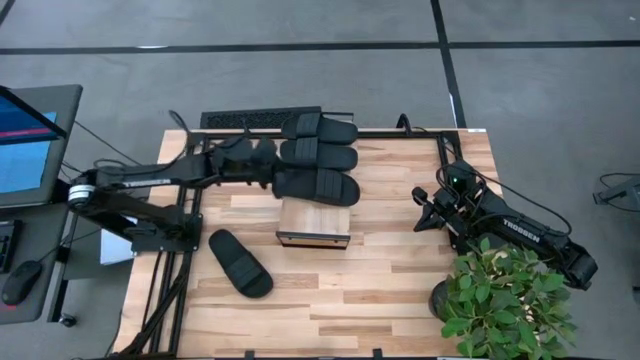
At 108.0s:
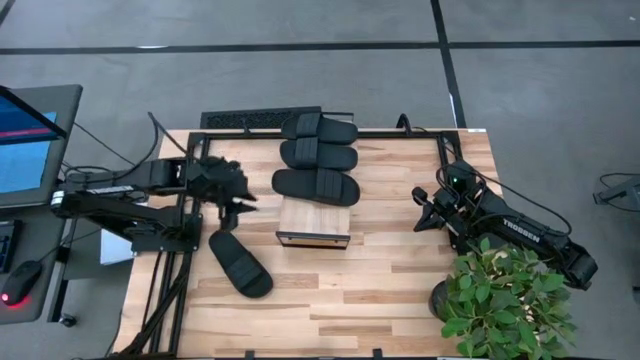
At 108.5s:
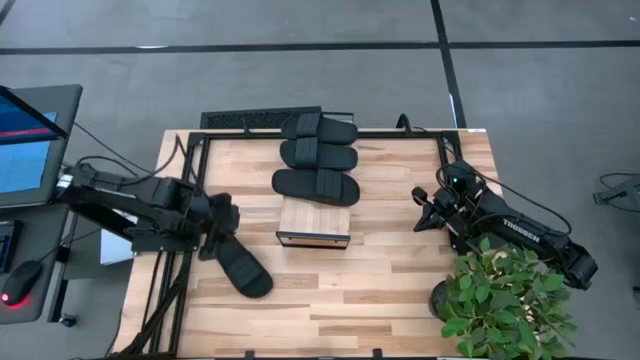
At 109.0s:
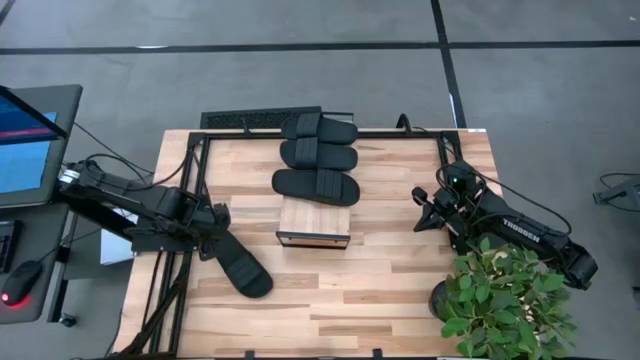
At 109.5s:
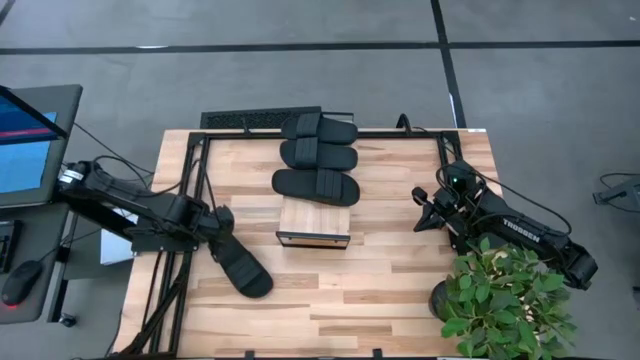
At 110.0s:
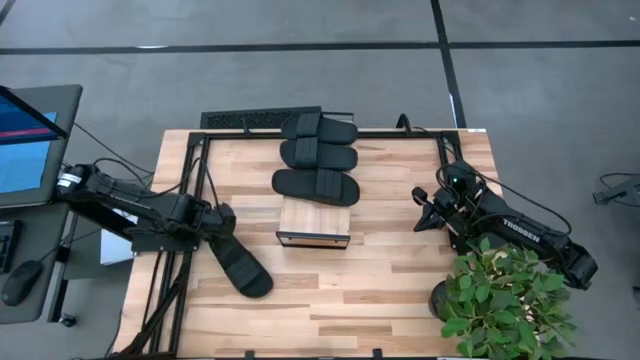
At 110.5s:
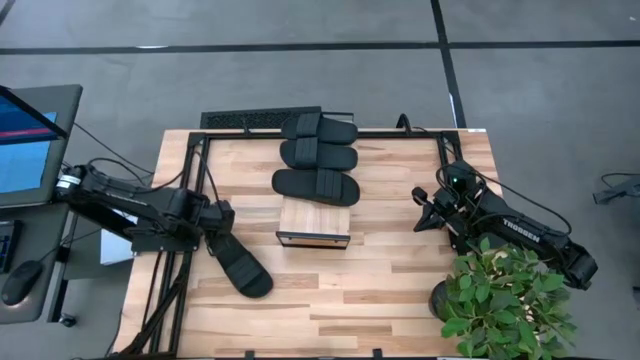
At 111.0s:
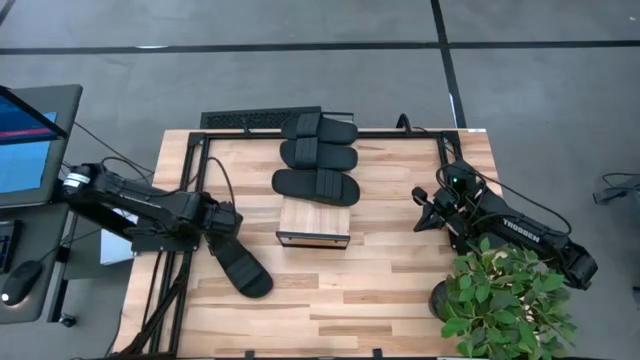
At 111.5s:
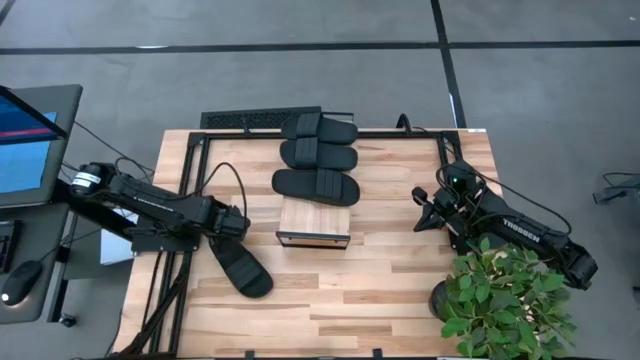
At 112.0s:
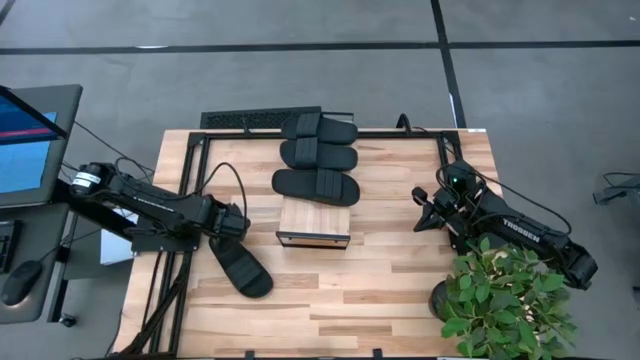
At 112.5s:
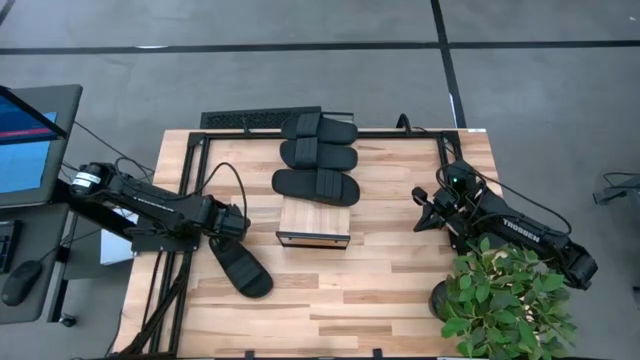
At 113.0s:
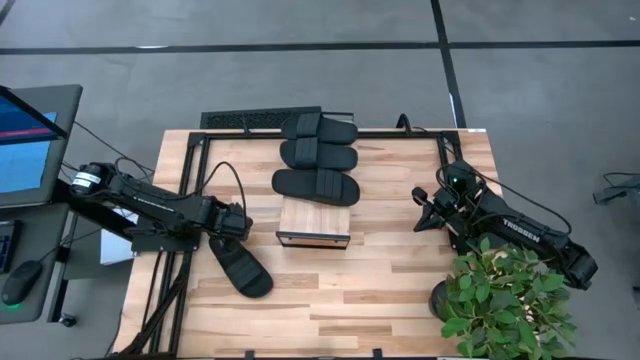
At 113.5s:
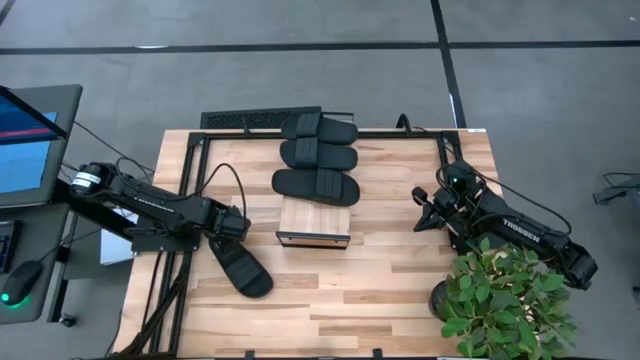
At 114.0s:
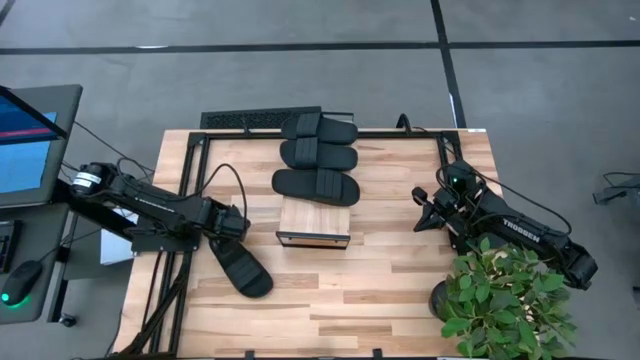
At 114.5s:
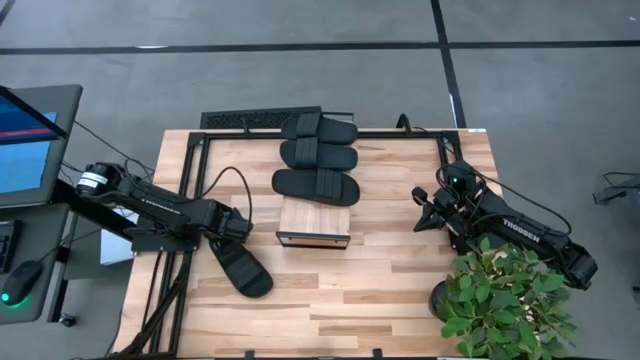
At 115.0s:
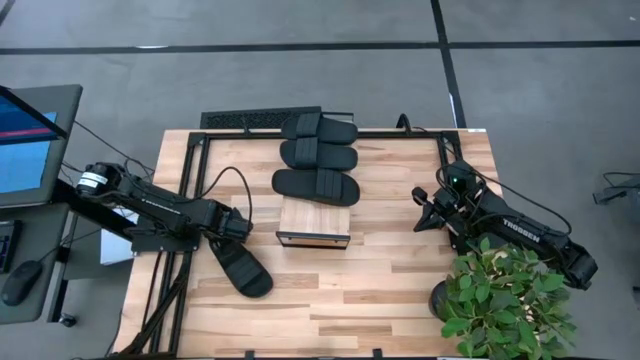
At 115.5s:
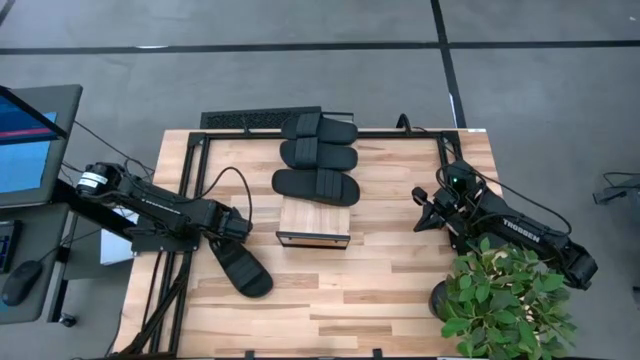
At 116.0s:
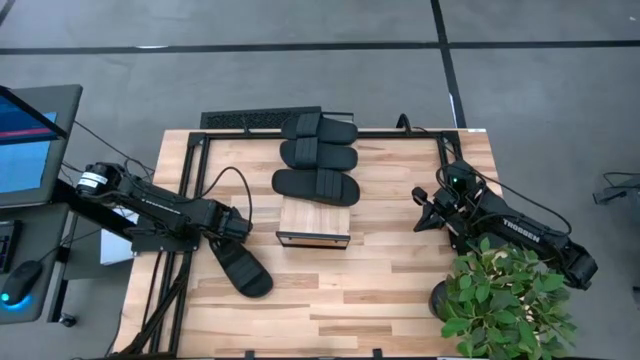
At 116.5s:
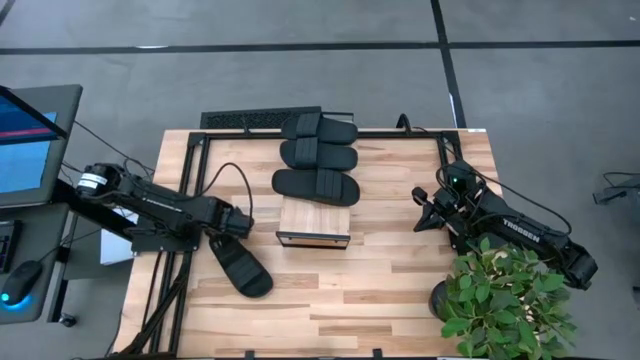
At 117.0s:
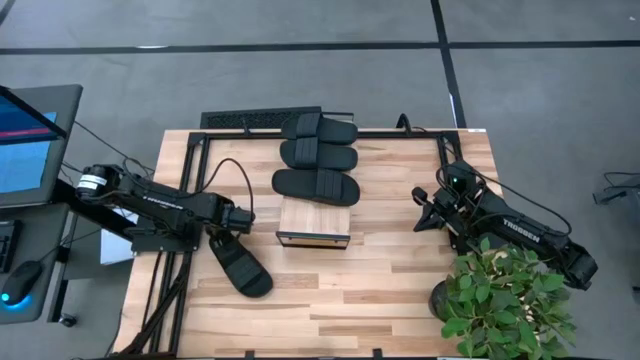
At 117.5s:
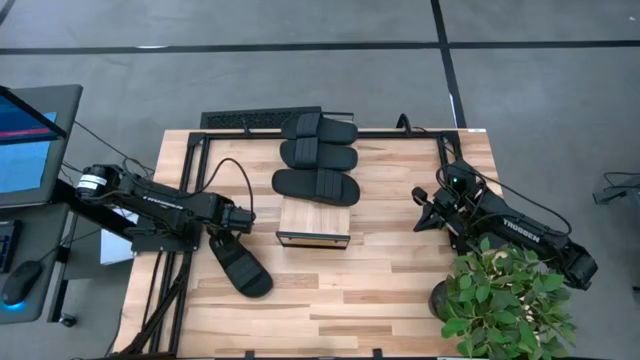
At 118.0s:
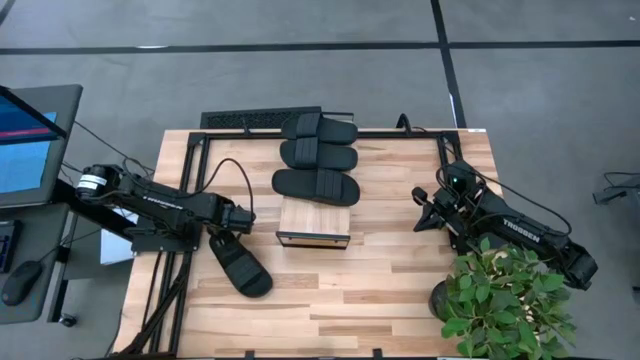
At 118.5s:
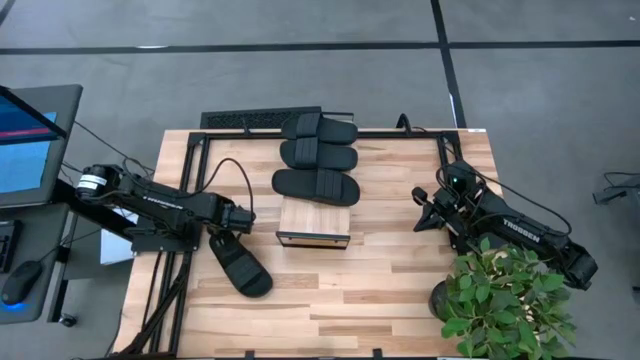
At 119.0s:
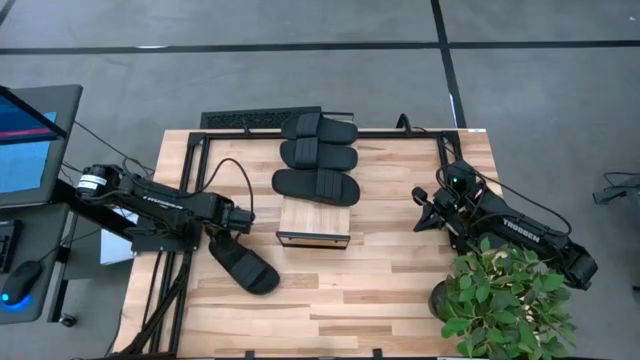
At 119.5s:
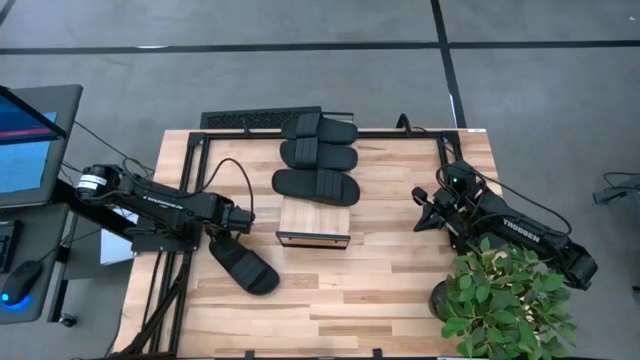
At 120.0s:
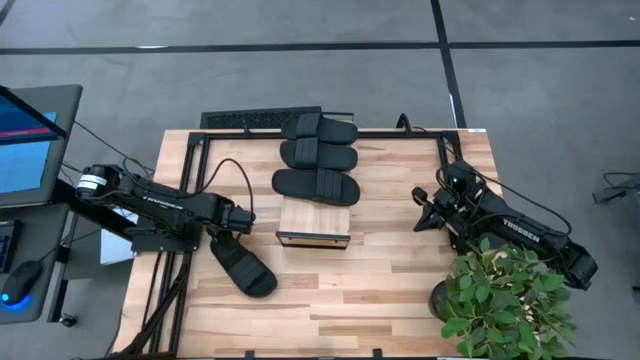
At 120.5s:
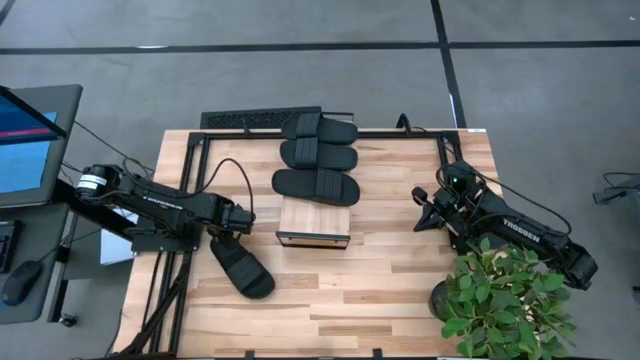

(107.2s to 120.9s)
Task: Pick and place slides into the shelf
Put the black slide on the shelf

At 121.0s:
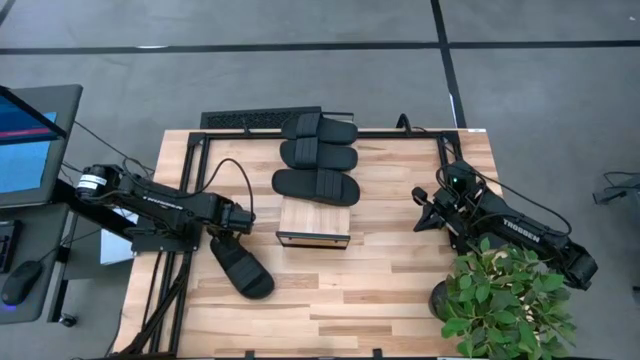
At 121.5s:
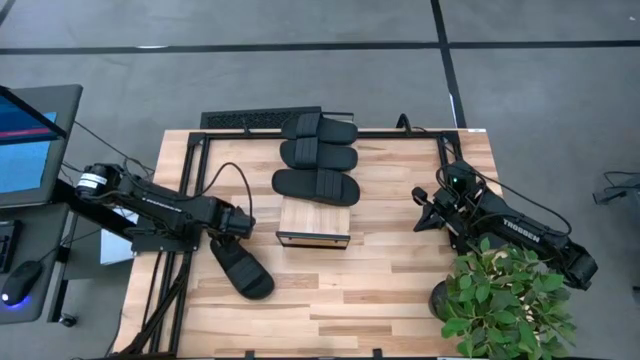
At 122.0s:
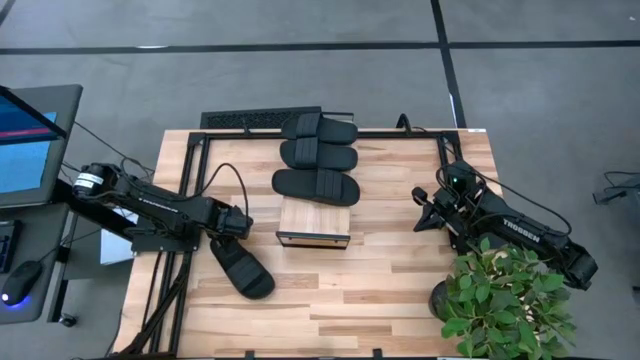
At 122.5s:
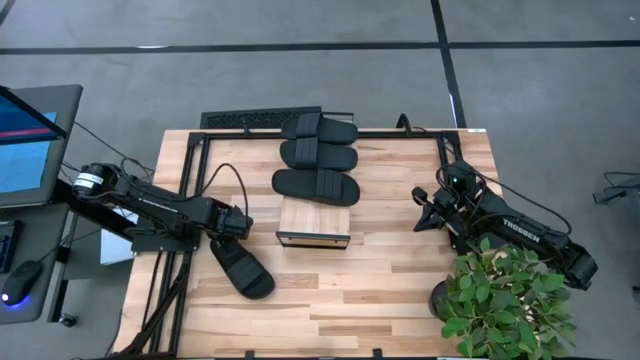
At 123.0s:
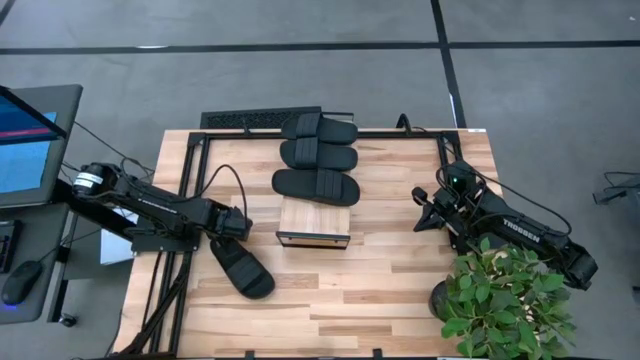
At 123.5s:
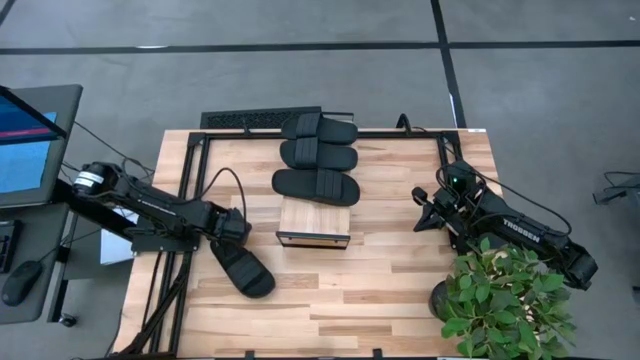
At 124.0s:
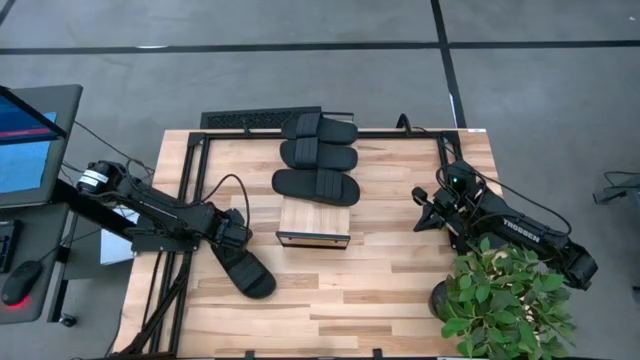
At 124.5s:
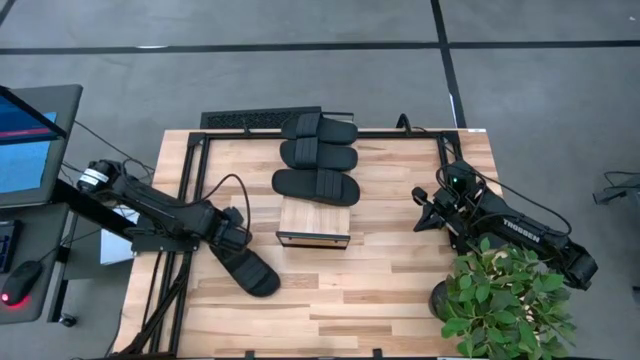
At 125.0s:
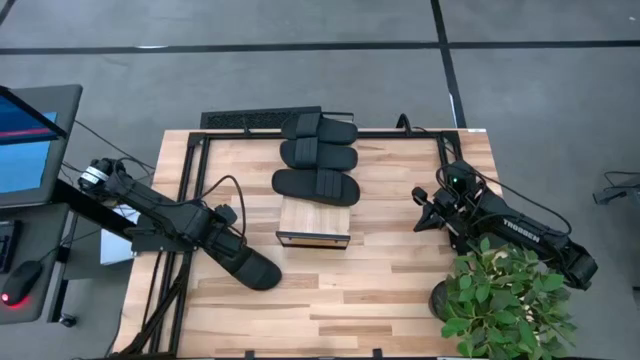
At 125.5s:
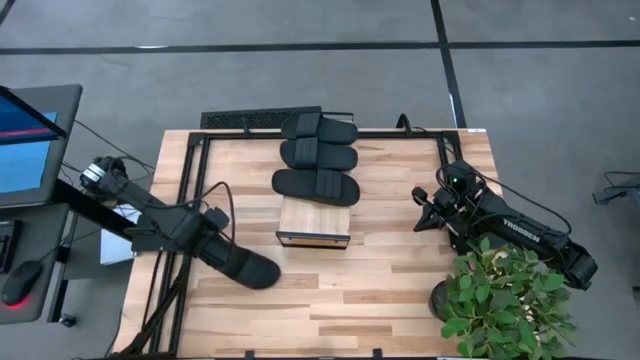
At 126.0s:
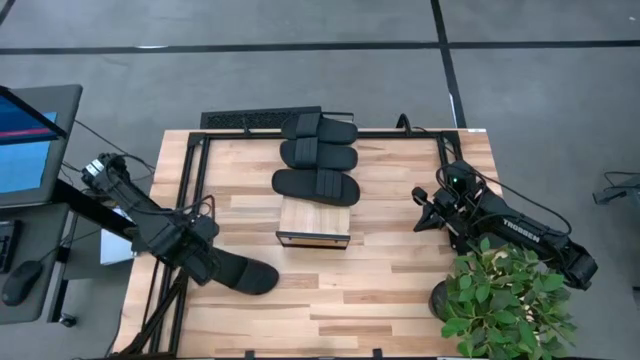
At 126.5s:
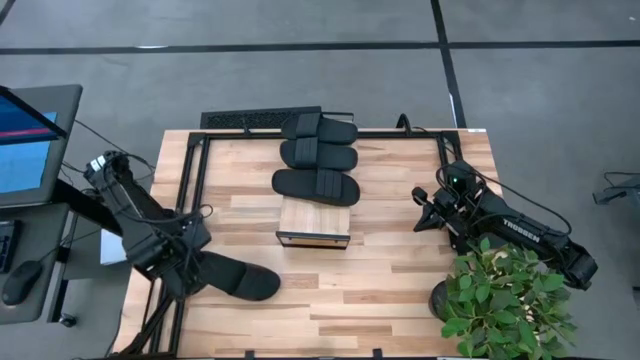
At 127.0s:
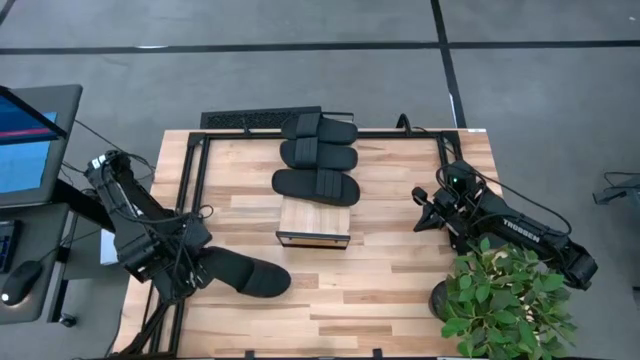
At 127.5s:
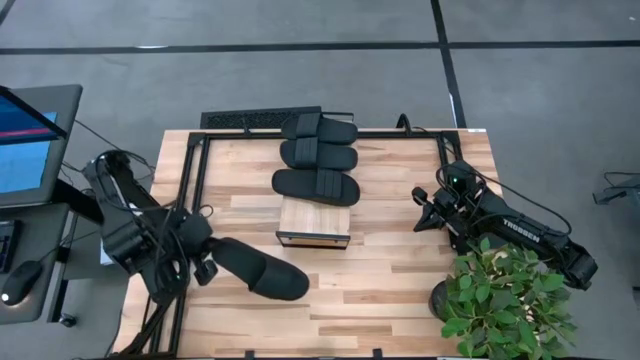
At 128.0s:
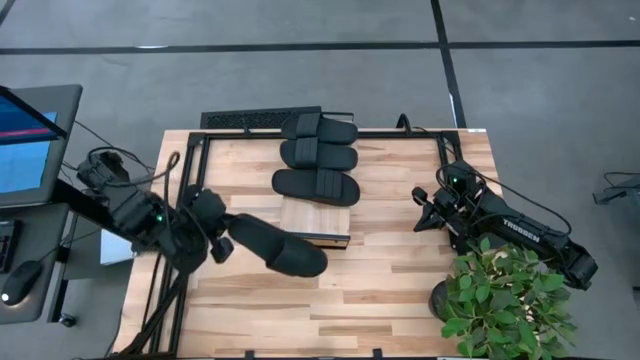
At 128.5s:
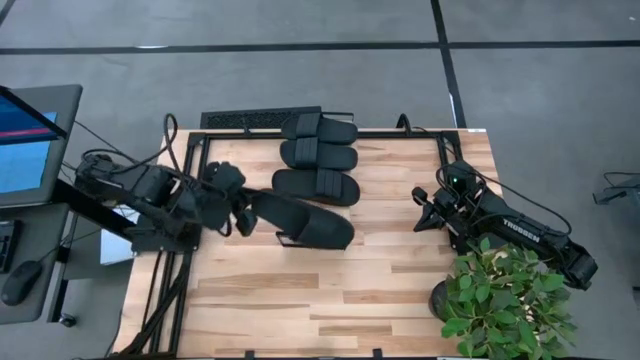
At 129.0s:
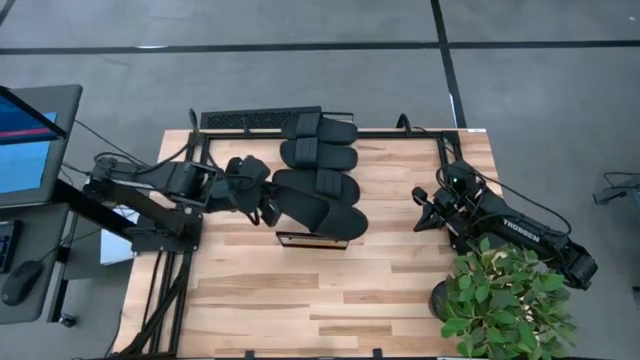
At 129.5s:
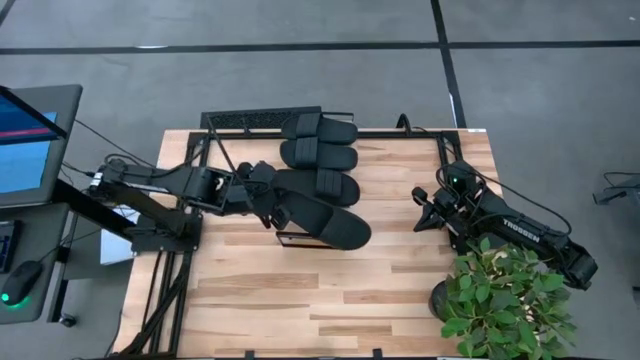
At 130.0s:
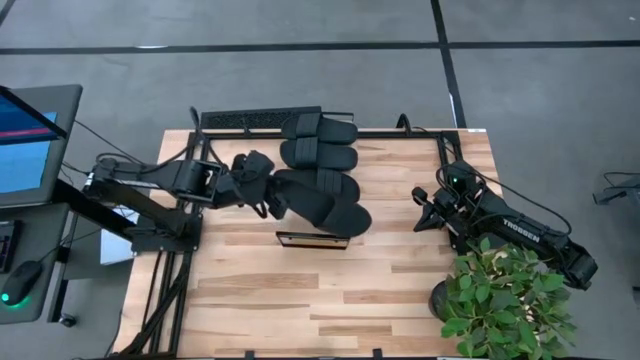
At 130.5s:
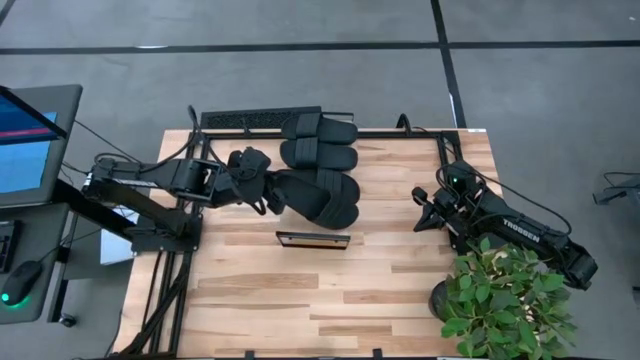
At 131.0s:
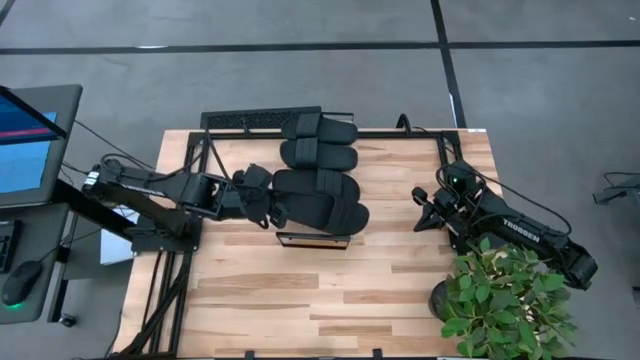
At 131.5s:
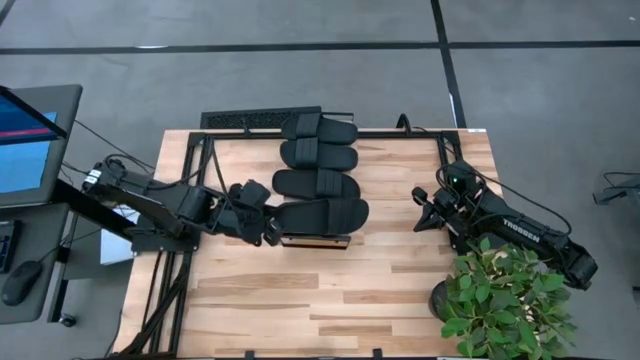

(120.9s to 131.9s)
Put the black slide on the shelf
